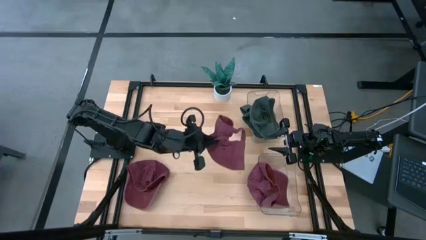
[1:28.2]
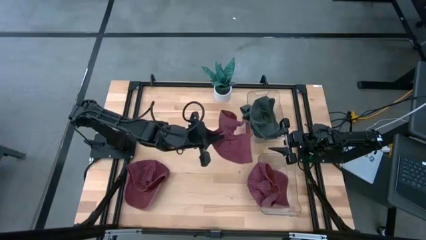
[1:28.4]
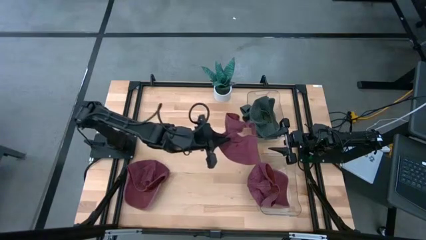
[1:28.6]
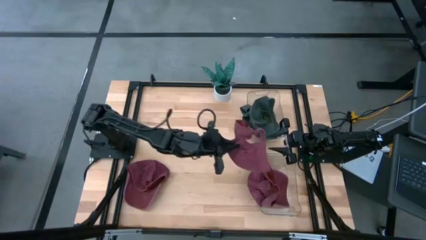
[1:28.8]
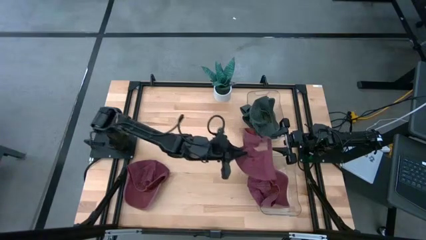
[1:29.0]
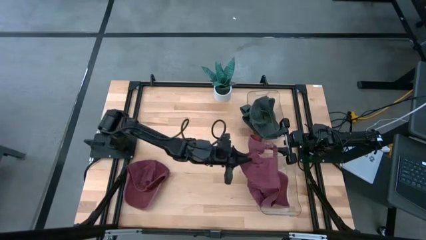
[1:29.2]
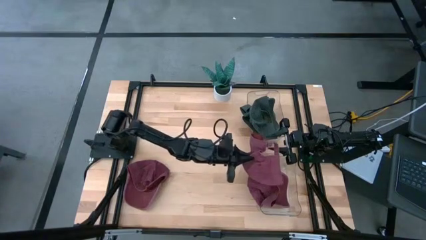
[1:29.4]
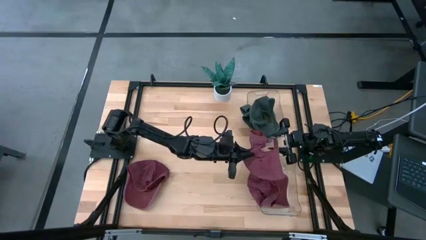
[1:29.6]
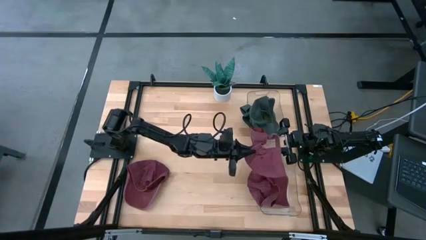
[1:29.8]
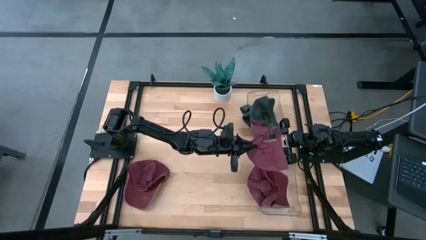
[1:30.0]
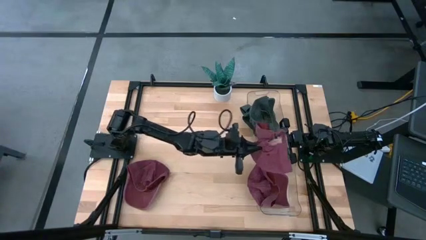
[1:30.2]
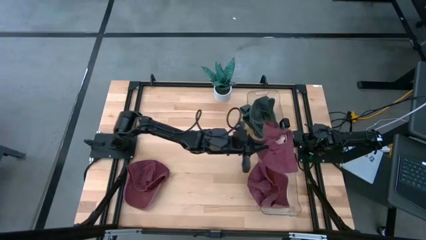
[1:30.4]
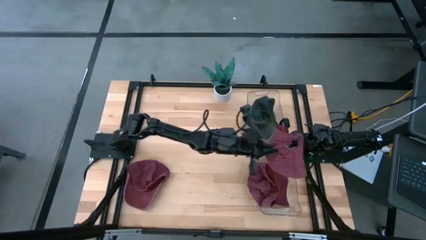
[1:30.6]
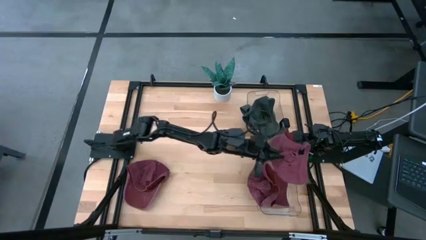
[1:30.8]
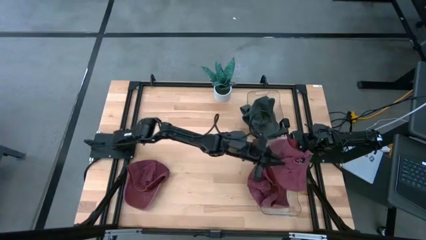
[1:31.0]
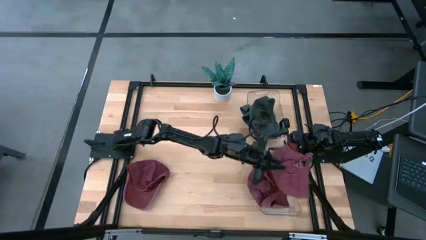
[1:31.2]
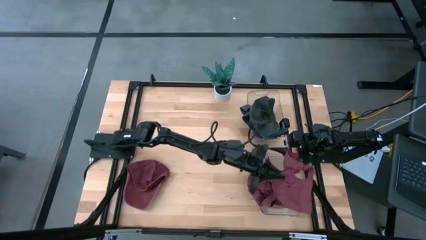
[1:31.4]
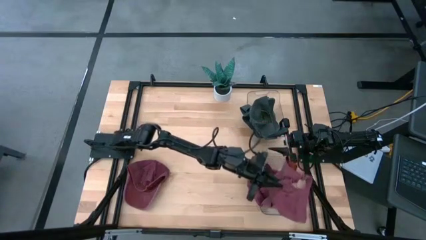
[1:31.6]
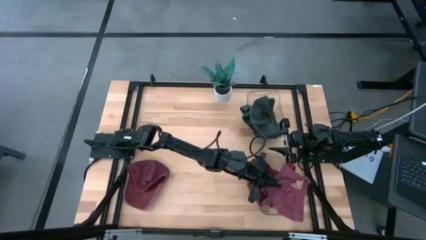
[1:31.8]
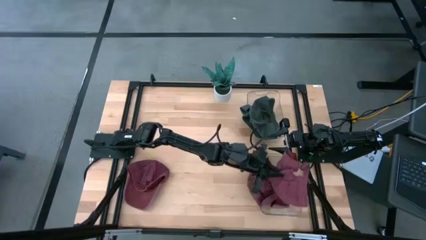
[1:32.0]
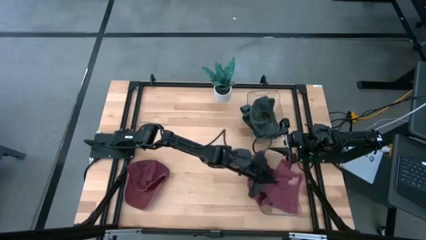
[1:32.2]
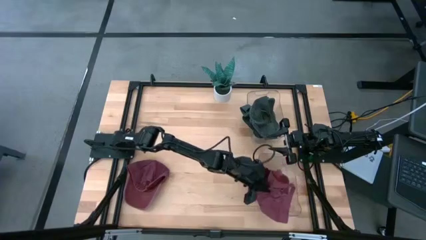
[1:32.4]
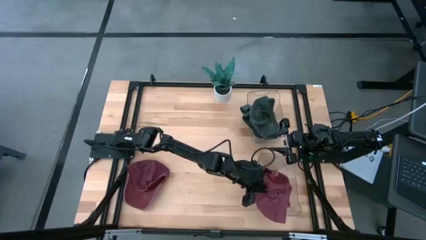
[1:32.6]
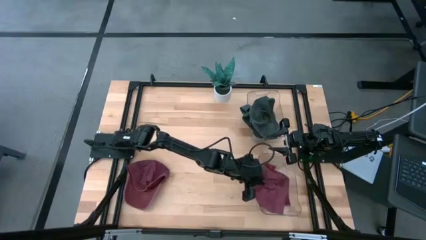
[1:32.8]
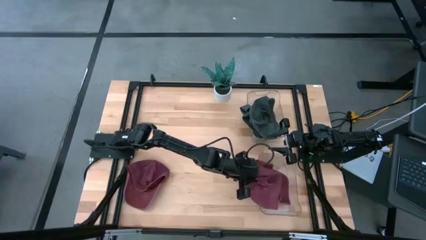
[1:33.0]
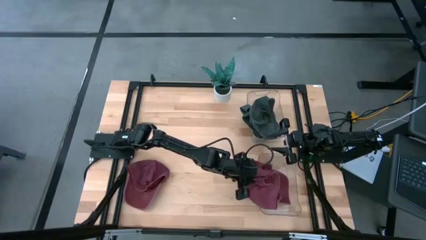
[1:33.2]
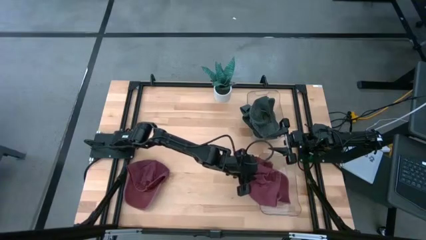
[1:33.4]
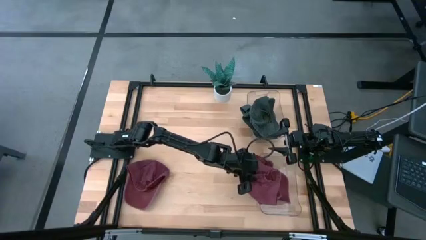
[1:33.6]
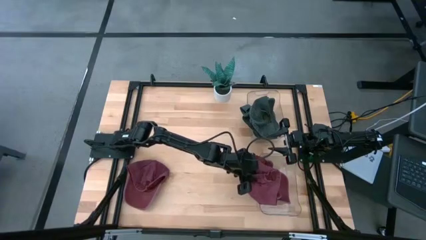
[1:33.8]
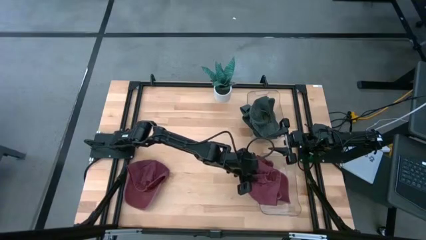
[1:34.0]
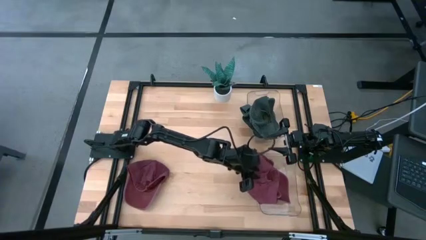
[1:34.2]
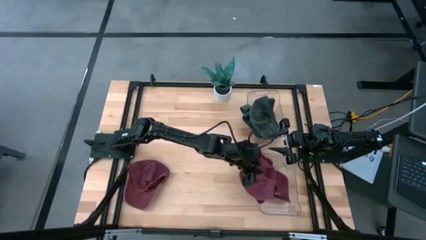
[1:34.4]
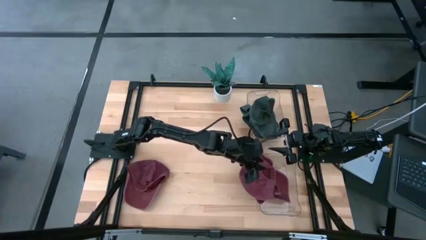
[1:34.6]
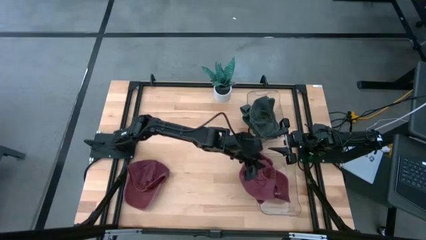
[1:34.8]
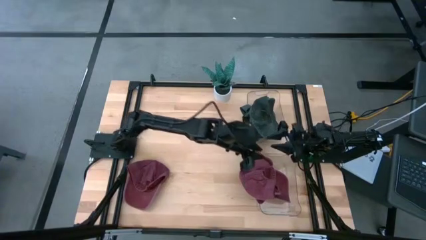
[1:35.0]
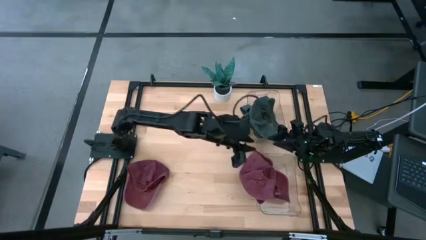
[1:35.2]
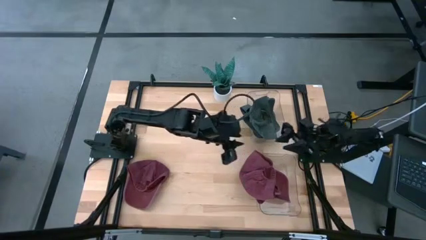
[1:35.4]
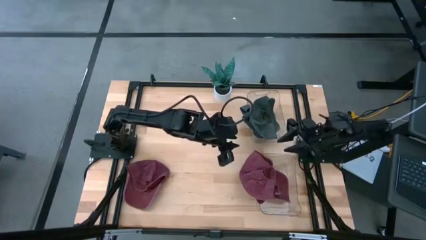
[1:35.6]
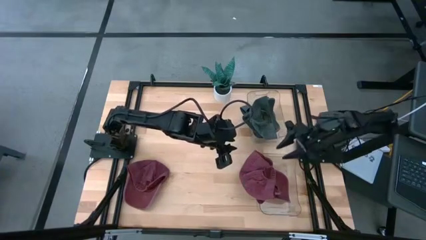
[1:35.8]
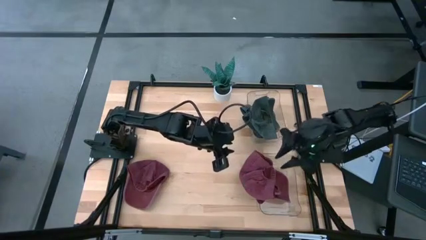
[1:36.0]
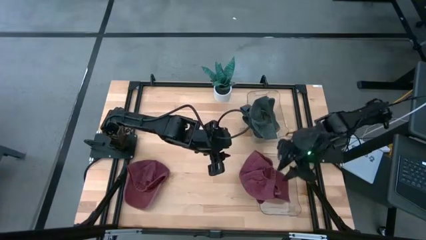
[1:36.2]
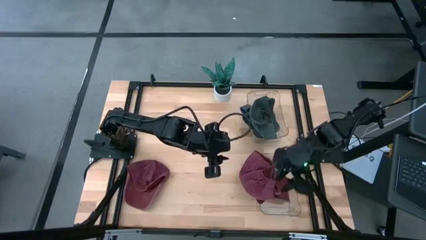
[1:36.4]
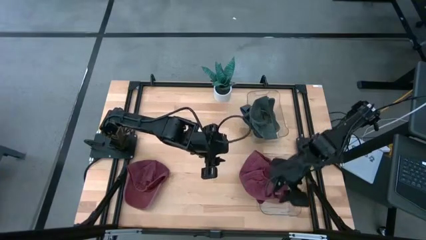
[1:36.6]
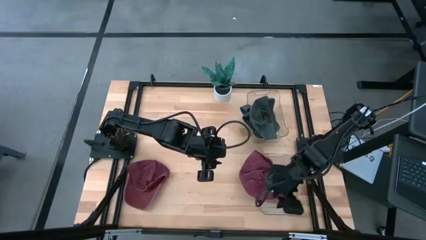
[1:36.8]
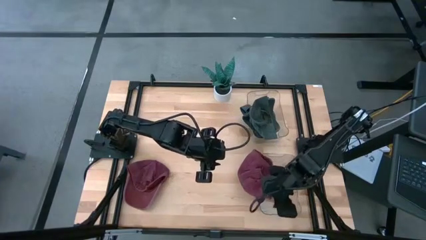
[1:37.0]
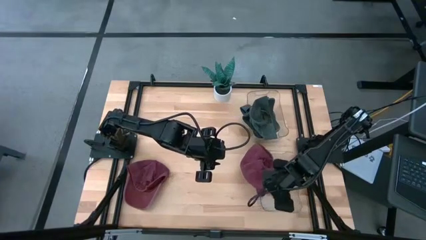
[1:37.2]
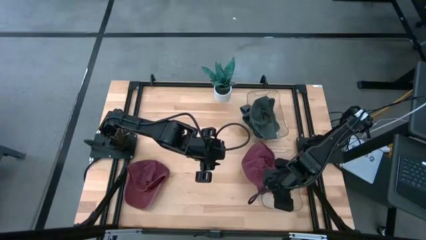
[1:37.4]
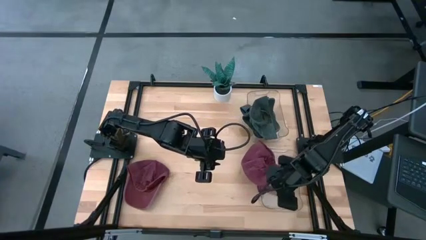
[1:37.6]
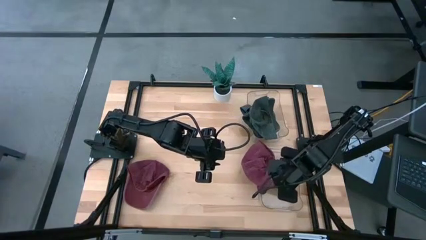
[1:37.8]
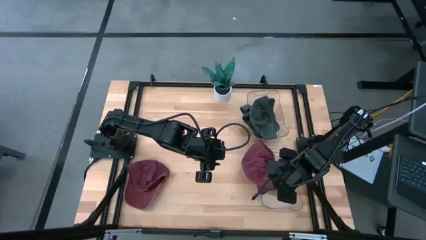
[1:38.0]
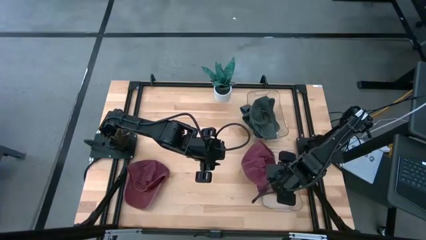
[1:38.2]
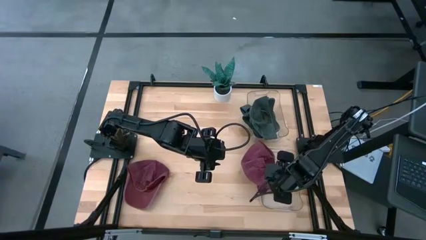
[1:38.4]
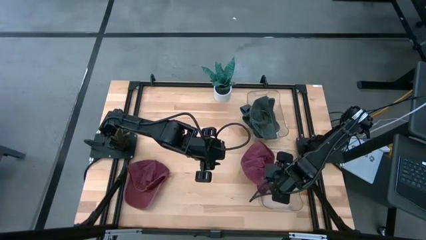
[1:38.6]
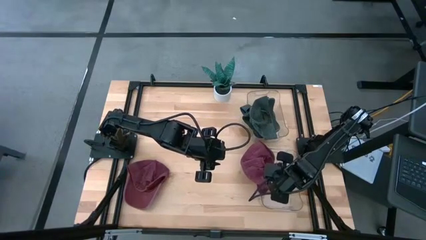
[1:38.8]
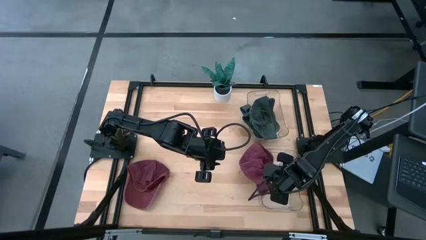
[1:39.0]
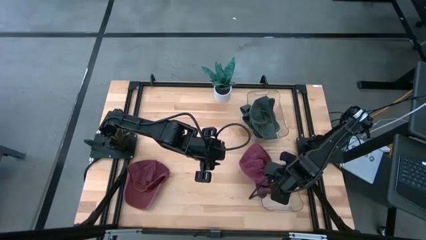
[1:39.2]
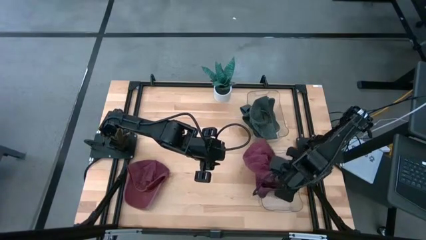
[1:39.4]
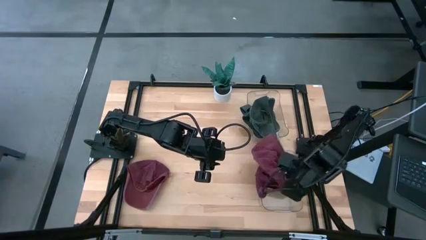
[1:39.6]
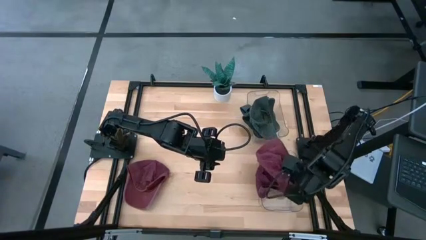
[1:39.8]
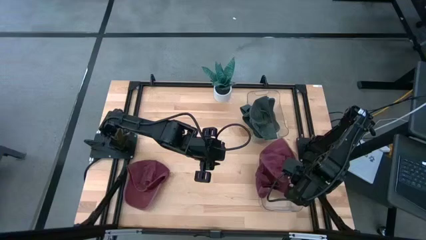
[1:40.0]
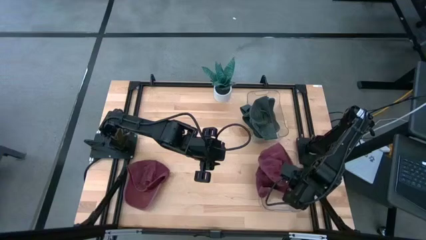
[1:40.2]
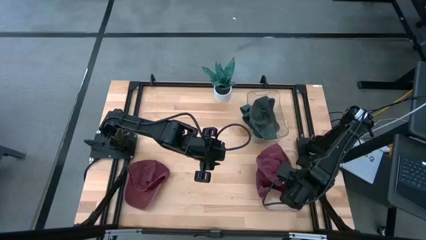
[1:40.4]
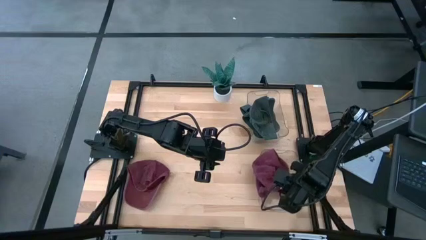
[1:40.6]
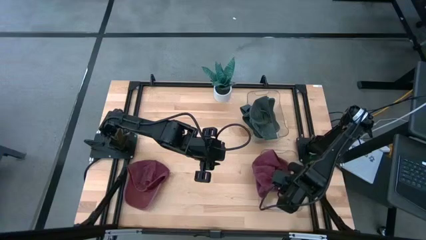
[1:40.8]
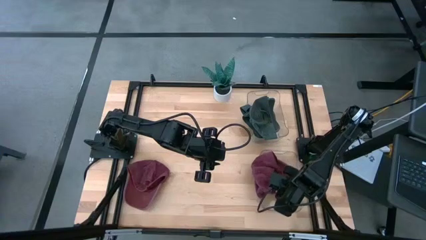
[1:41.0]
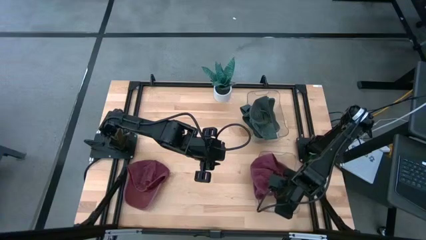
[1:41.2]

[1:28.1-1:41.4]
Task: Pick & Place hat
Put the top red cap into the bottom transparent bin

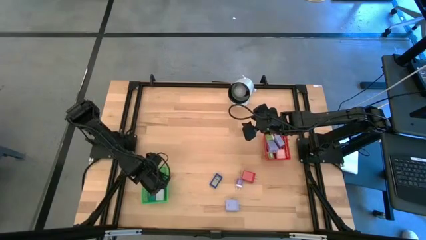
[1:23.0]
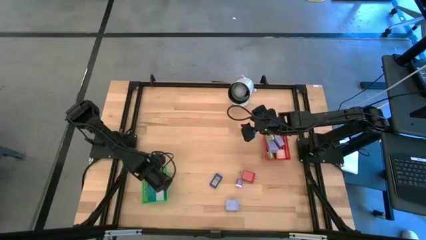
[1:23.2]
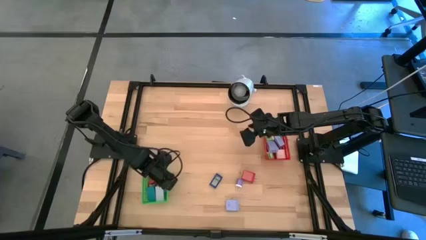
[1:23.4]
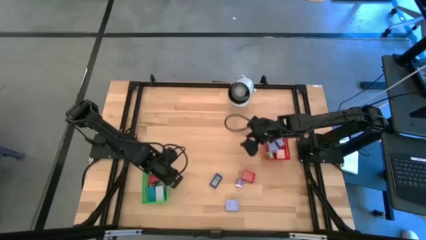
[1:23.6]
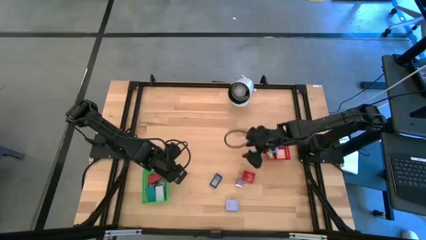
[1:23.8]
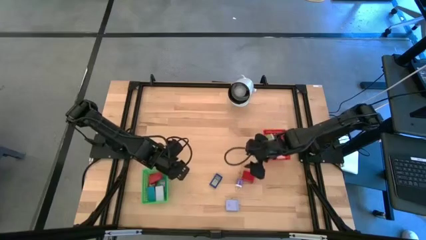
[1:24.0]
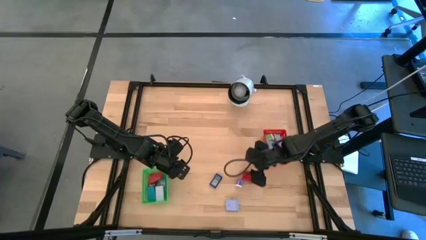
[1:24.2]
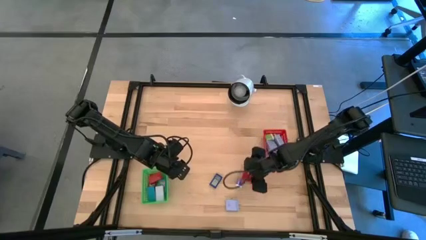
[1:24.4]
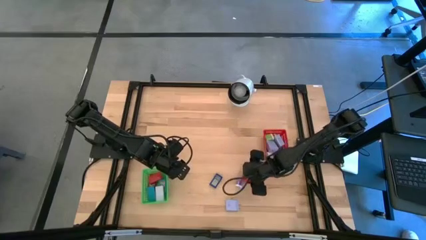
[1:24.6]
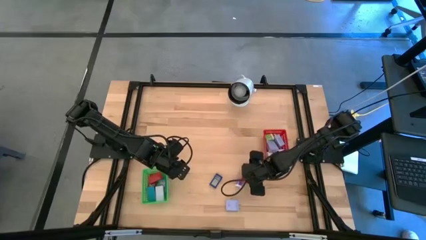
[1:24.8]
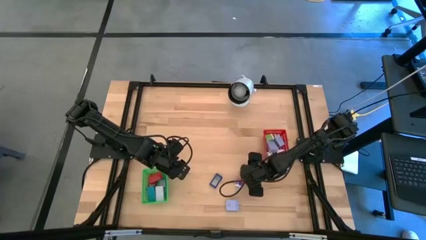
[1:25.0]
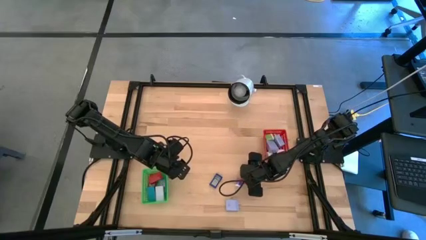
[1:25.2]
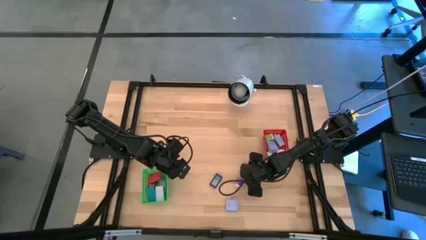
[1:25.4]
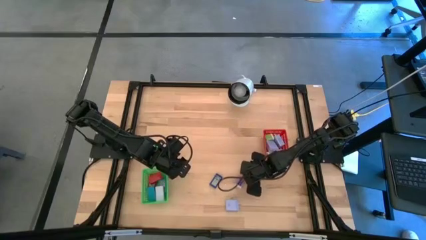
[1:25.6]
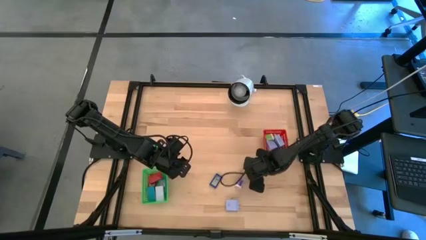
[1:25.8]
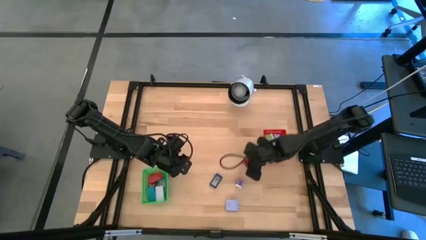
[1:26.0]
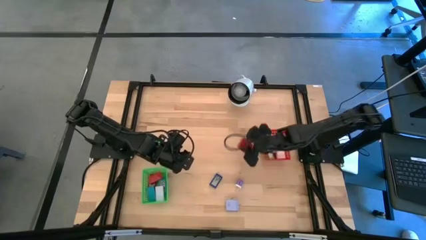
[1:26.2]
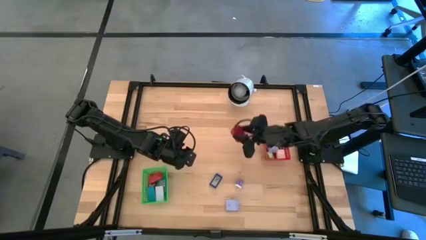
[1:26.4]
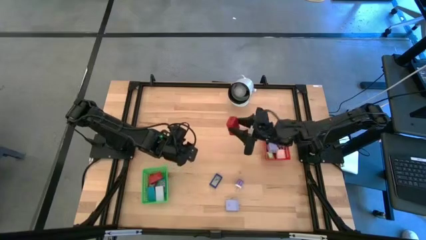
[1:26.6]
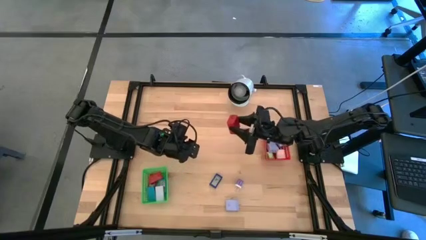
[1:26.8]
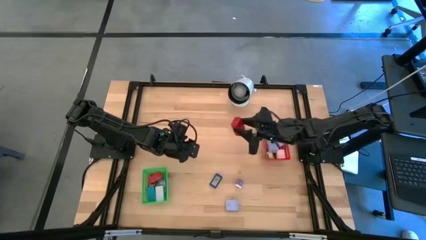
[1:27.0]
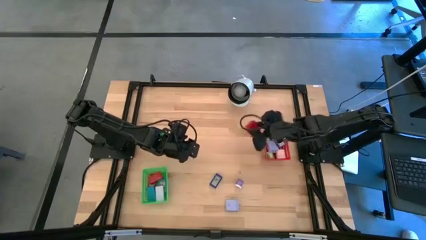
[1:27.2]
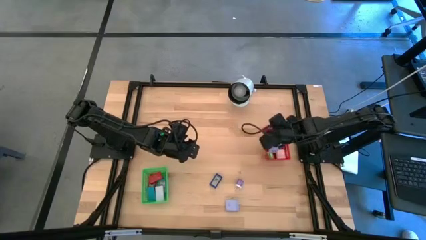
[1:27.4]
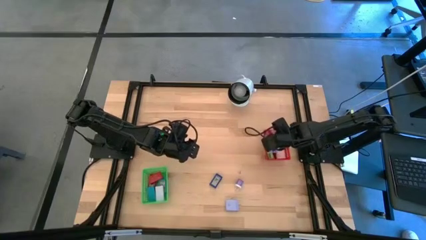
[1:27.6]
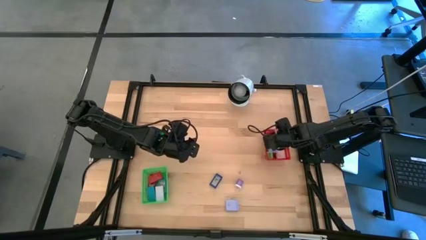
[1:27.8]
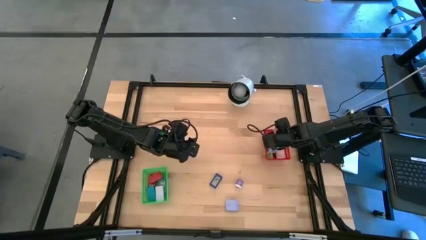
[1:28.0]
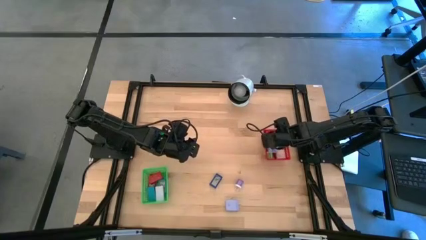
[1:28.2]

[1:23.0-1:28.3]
Task: Pick & Place Office items
Put the red charger adapter into the red bin
